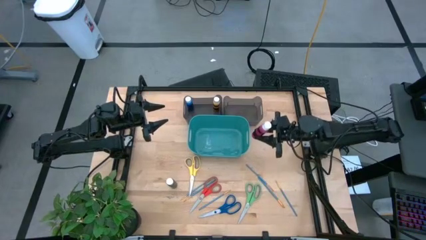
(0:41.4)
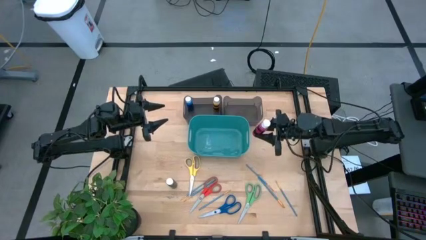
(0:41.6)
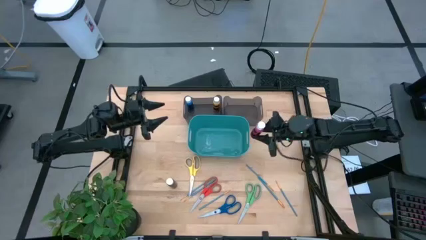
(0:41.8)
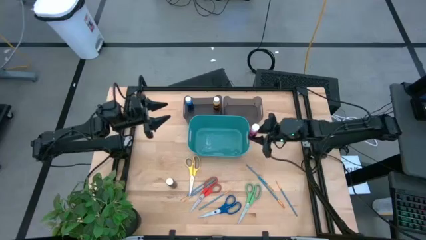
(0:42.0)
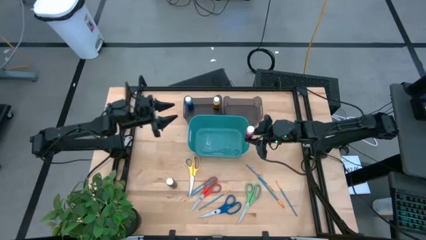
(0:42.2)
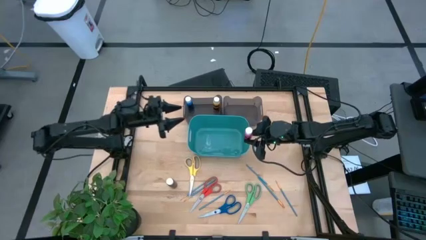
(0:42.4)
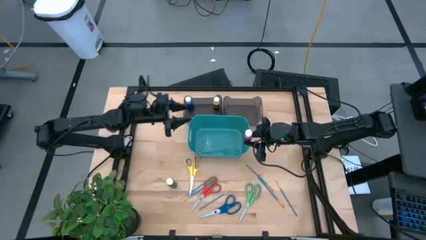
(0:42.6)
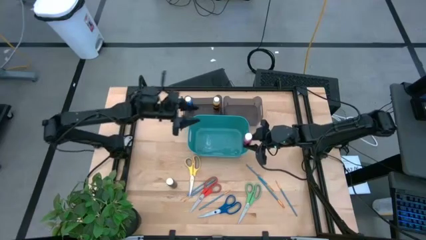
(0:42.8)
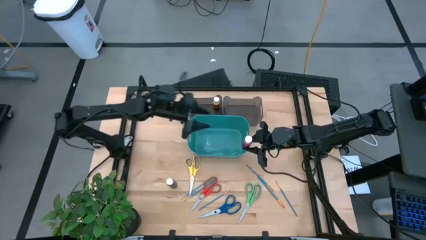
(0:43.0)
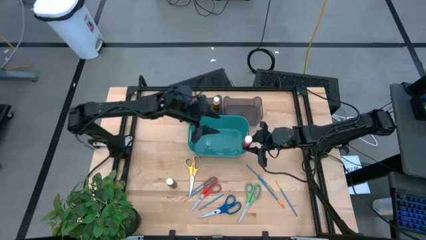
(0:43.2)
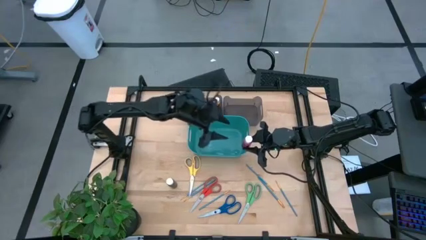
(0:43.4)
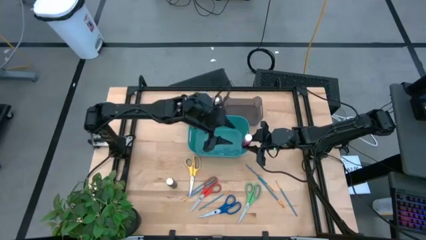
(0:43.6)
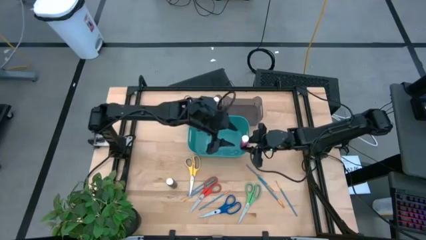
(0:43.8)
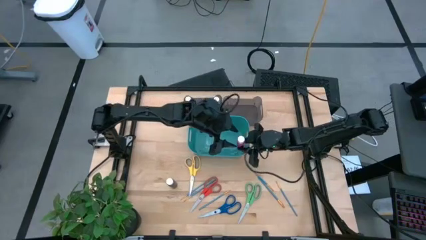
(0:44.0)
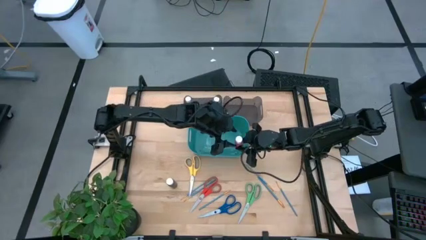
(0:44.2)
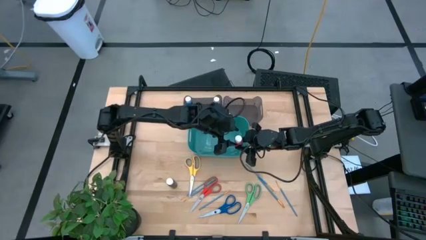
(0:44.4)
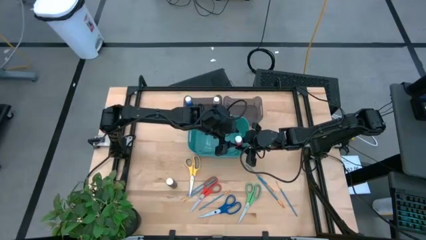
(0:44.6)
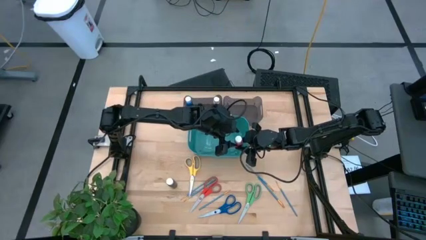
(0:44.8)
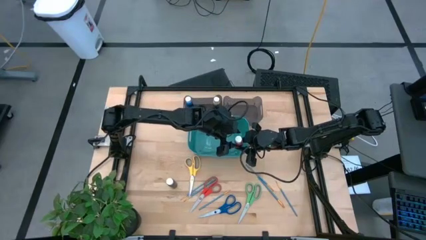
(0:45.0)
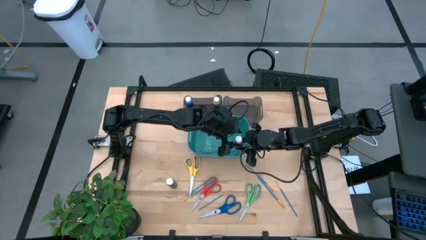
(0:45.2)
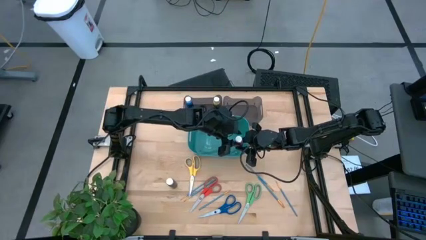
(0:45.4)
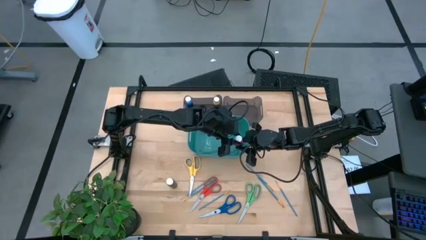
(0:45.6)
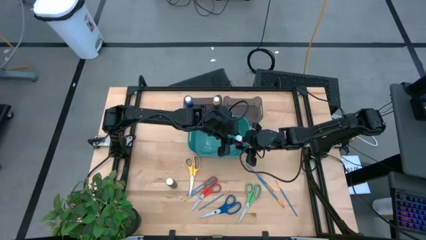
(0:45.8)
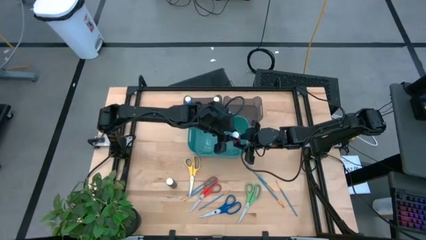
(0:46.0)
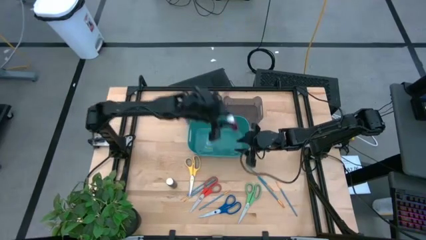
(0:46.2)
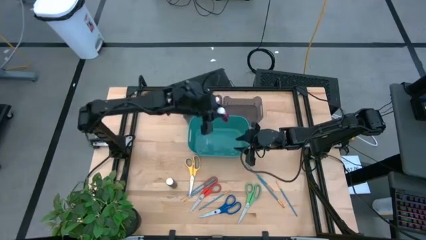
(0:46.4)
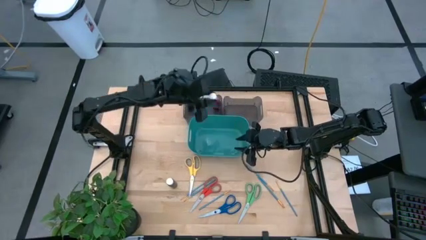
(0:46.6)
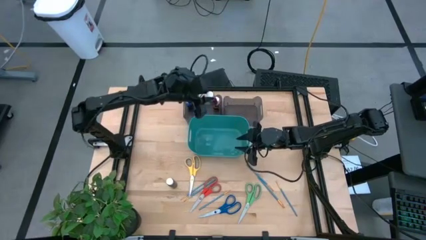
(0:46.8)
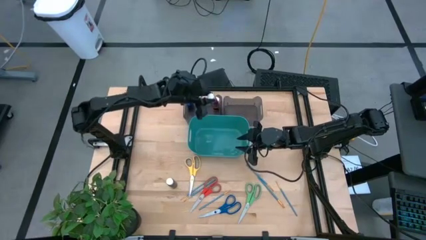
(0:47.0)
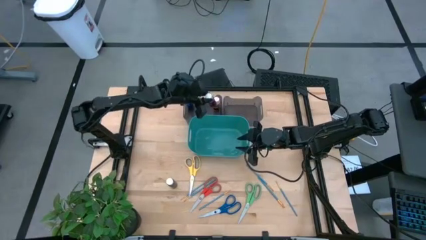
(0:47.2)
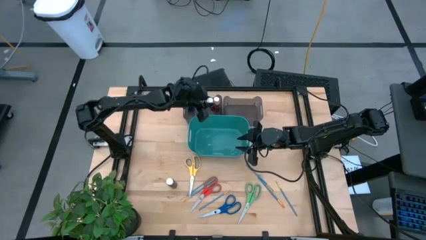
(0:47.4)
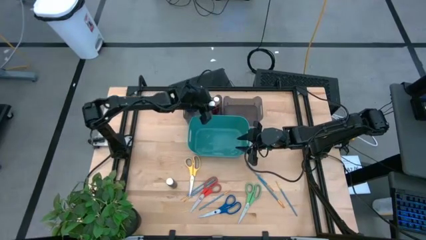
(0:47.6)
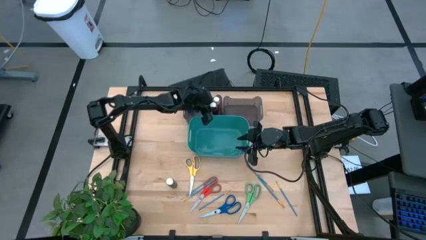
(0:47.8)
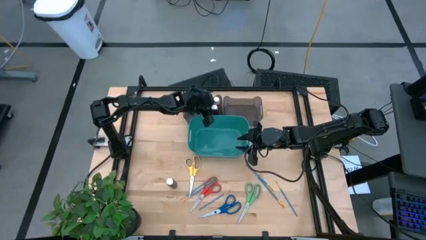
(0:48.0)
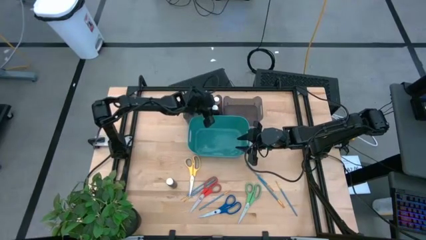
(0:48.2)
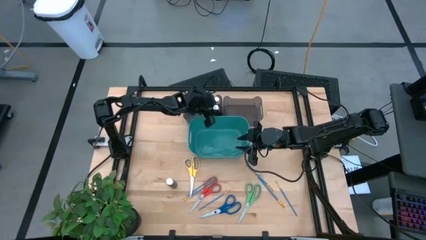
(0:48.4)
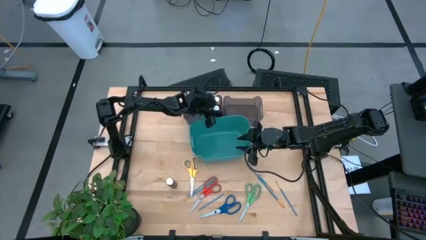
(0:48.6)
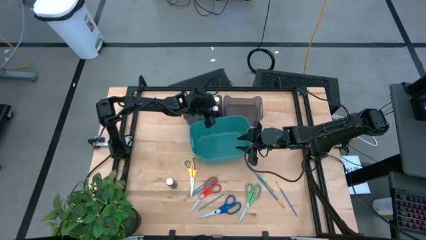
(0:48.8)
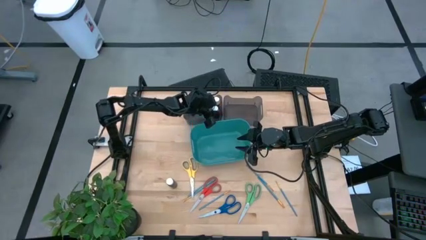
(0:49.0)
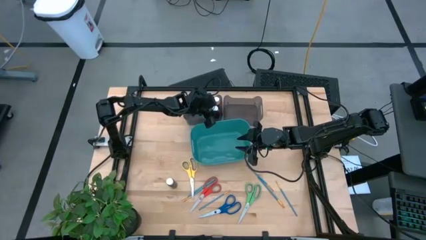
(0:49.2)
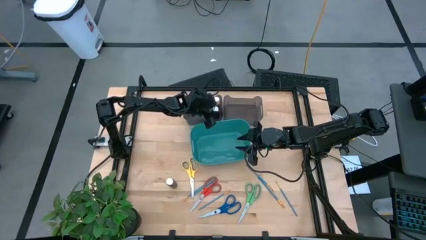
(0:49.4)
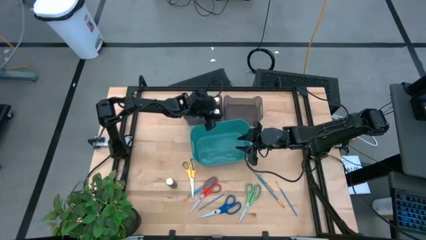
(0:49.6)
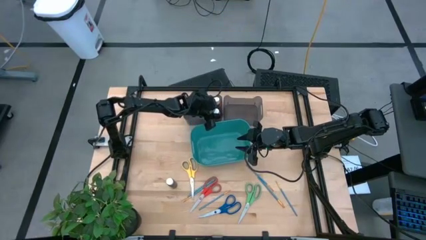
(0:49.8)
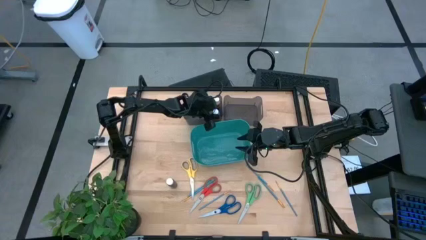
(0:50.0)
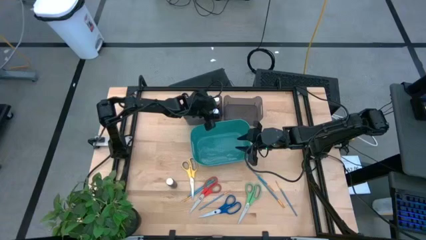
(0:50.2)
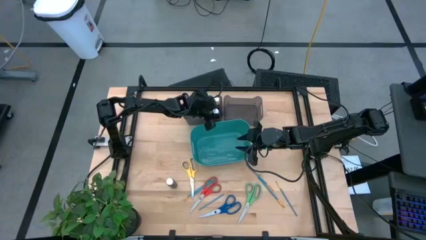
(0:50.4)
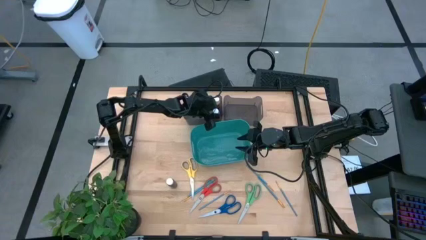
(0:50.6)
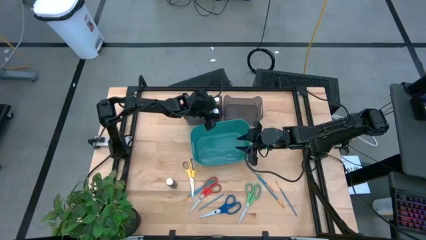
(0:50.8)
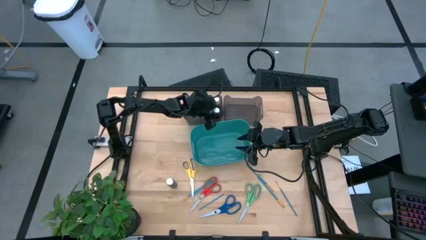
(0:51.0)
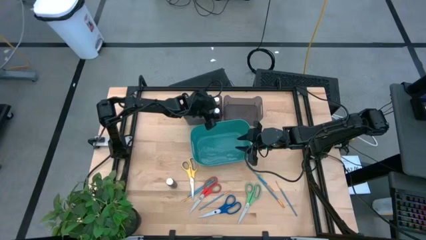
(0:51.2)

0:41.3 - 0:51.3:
Task: Pick & Place Paint Supplies
Put the pink paint bottle into the left black bin

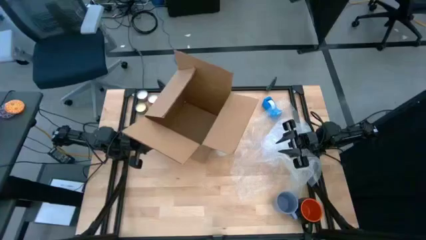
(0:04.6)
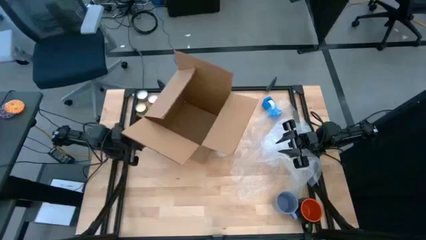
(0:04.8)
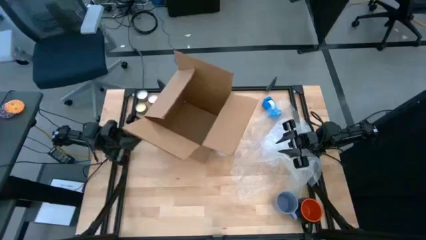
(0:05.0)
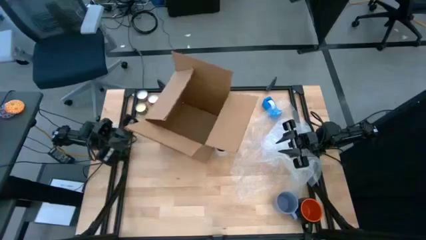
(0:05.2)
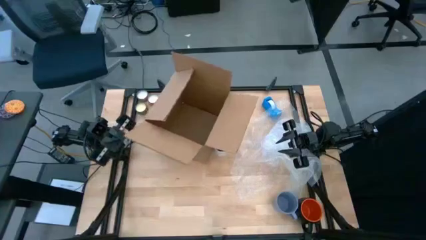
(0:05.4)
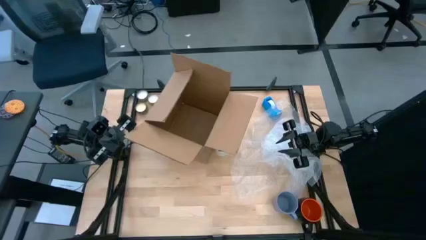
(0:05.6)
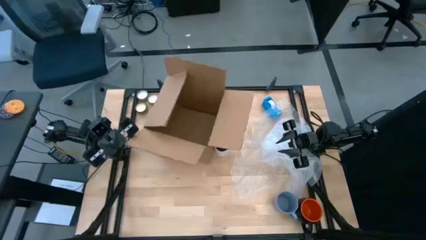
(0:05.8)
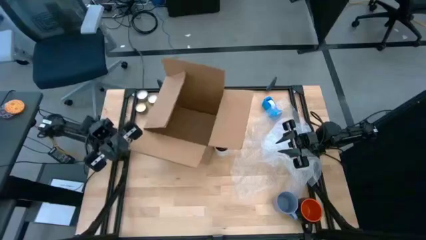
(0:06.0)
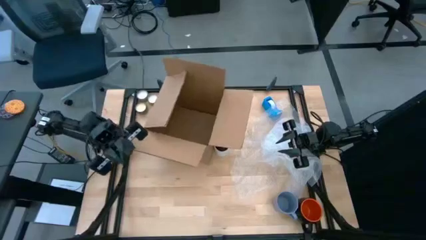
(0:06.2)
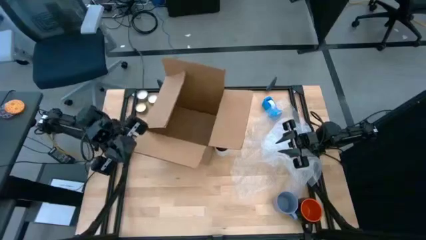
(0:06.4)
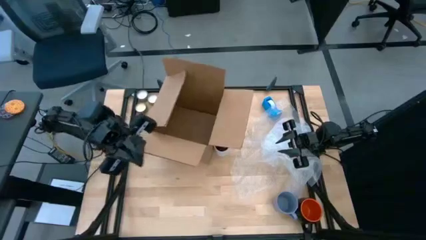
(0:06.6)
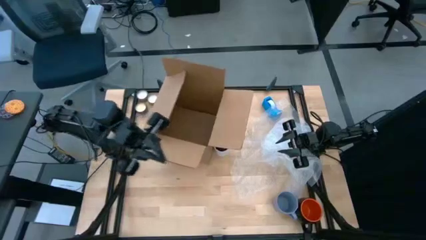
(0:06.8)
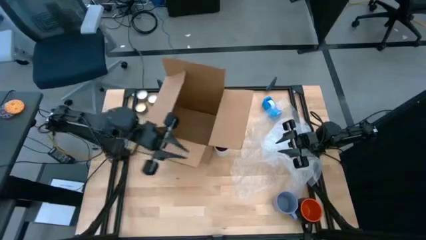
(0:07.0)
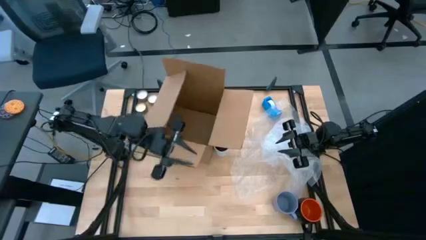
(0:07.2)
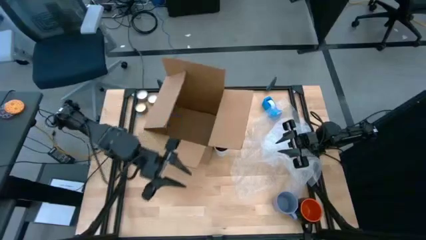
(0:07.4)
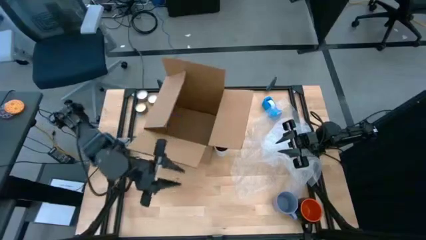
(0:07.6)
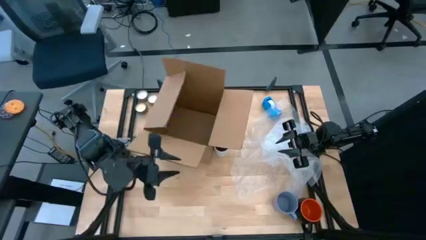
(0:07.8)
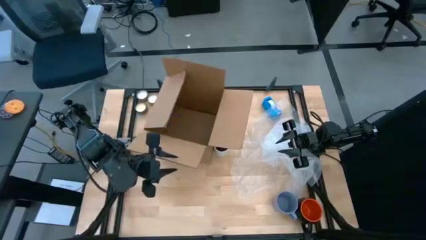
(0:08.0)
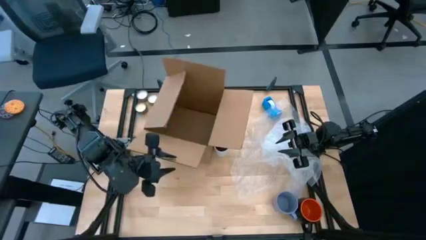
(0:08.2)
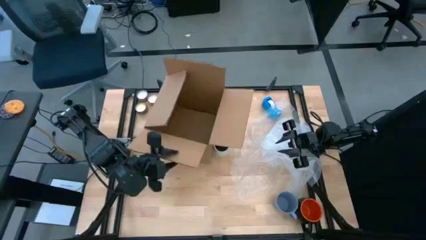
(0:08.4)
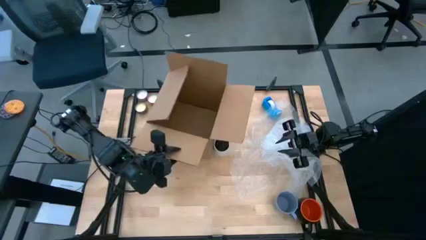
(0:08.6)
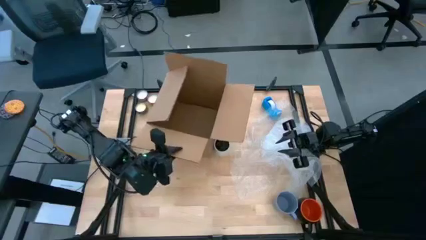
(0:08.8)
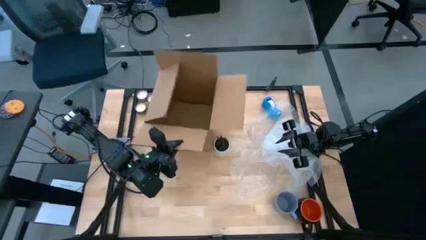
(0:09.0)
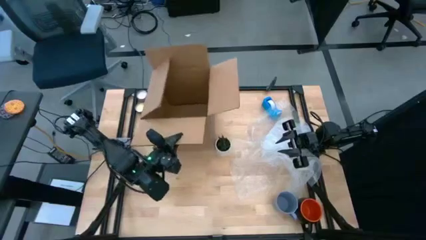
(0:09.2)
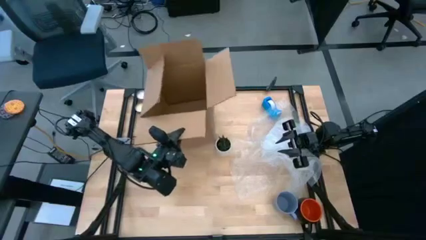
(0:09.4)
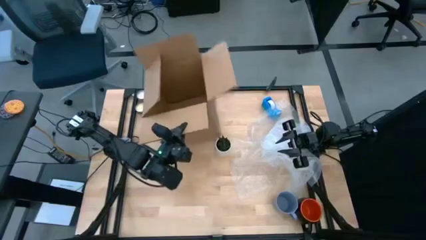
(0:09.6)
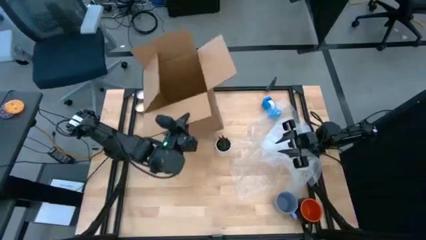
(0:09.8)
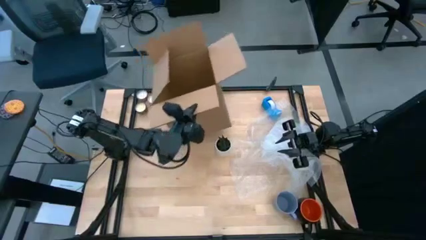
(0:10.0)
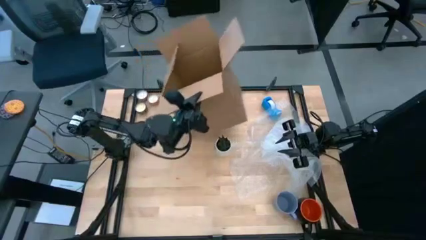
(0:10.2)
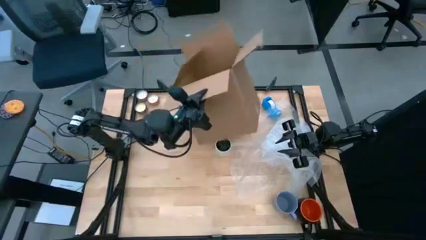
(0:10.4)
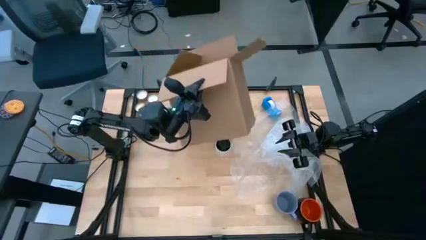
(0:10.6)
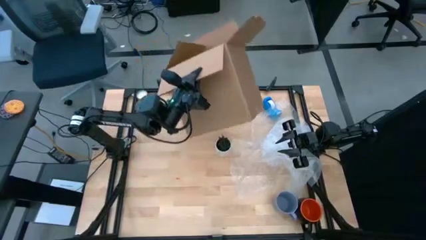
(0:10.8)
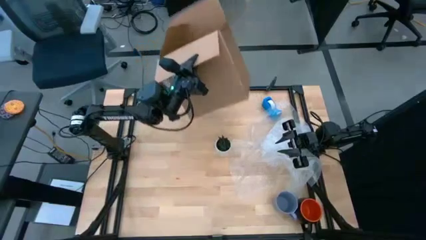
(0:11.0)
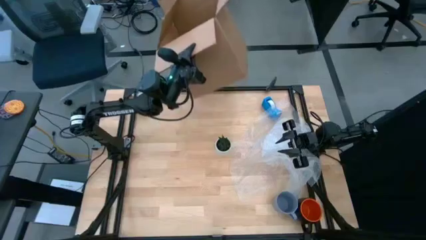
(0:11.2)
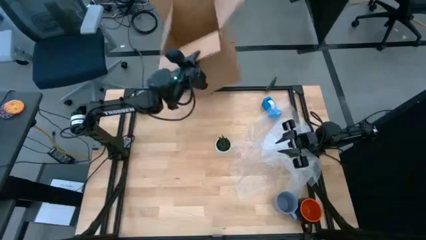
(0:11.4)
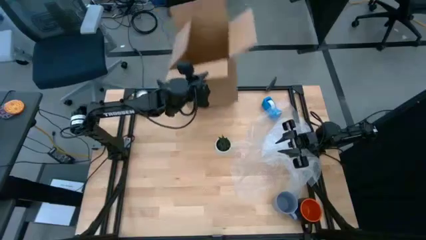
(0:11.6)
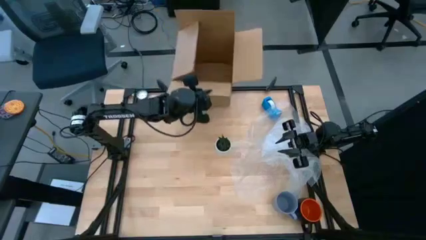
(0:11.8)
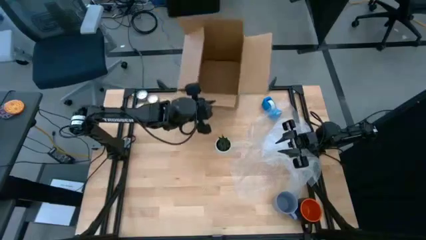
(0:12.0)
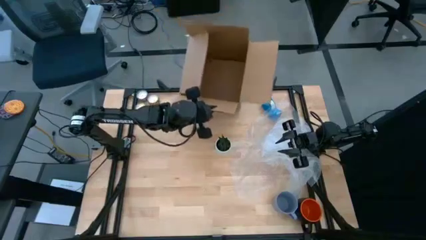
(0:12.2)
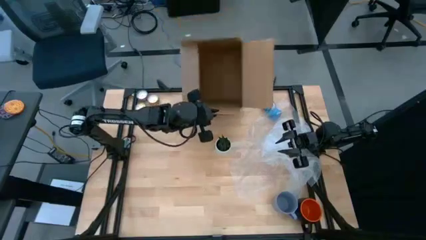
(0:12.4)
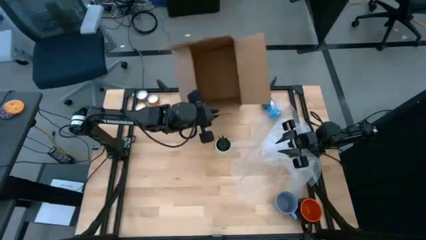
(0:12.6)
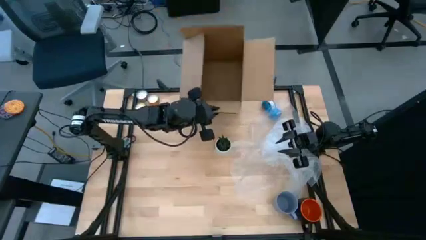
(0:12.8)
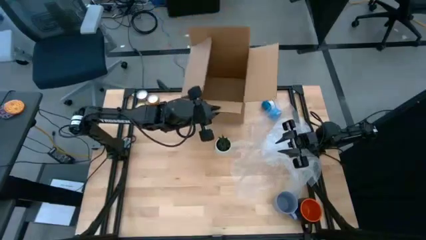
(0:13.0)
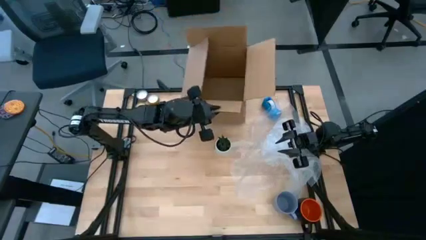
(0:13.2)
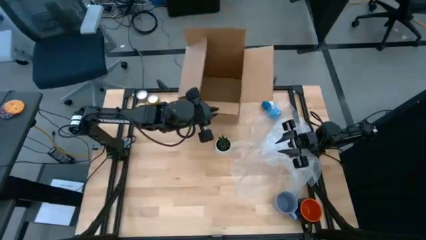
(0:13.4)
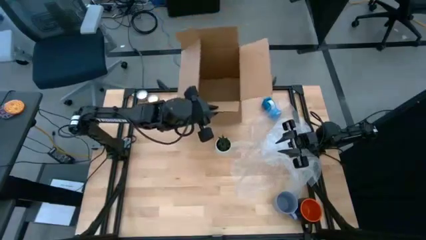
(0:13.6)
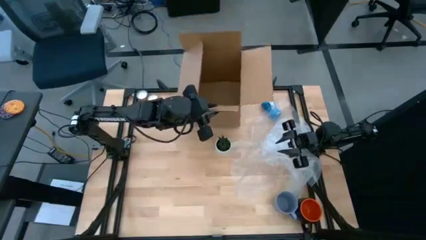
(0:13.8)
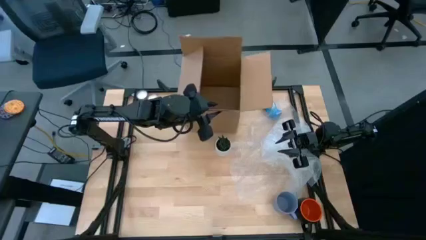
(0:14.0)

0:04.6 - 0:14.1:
Task: wrap mug
Move the cardboard box to the top center of the table
